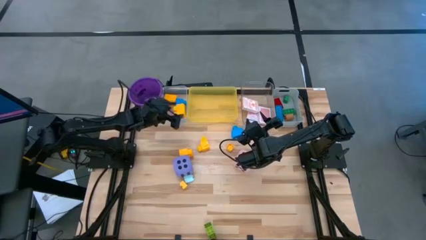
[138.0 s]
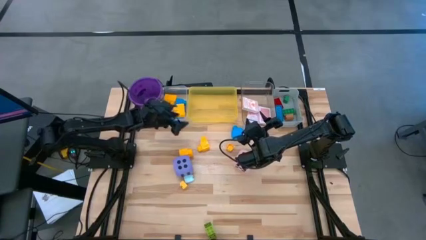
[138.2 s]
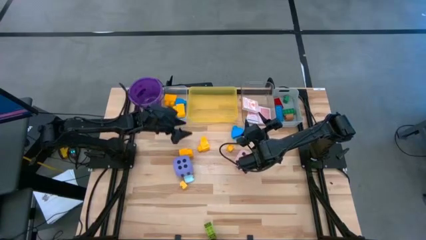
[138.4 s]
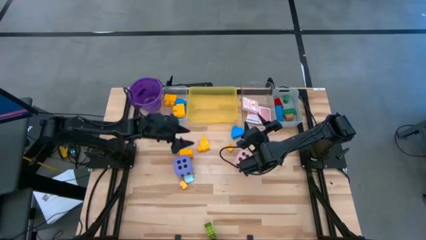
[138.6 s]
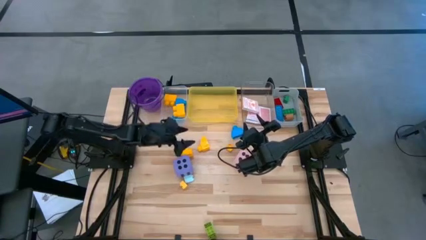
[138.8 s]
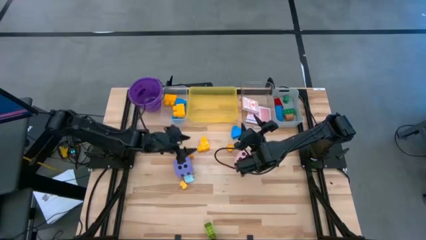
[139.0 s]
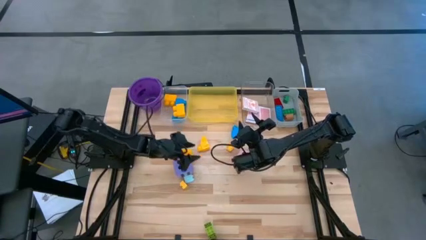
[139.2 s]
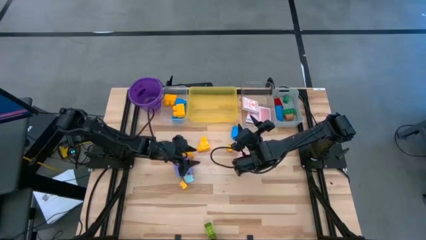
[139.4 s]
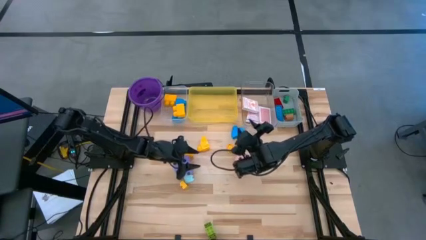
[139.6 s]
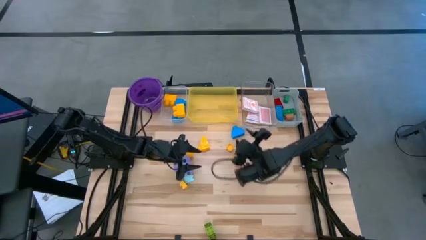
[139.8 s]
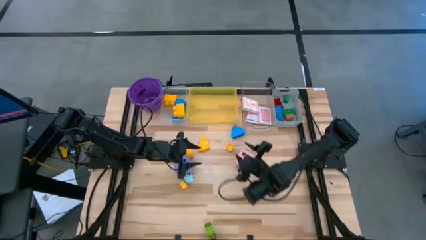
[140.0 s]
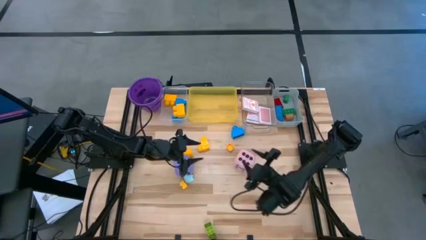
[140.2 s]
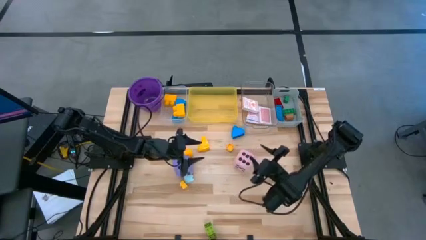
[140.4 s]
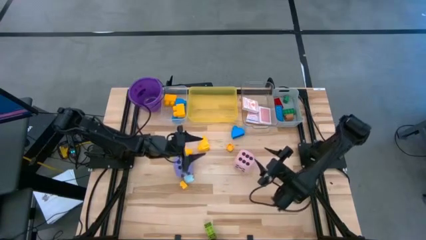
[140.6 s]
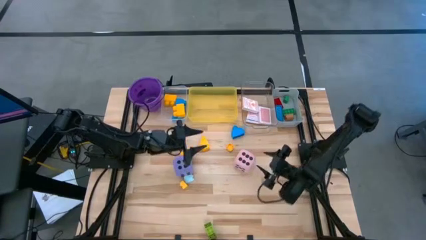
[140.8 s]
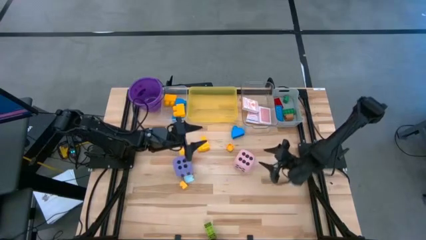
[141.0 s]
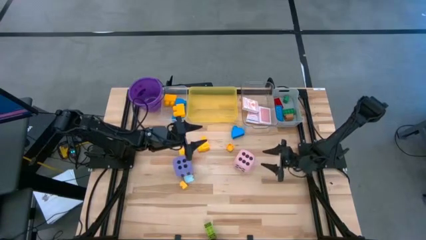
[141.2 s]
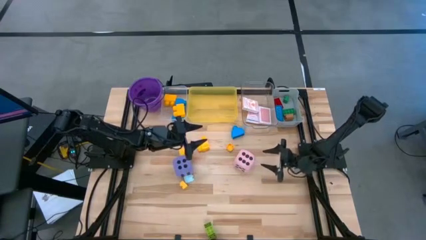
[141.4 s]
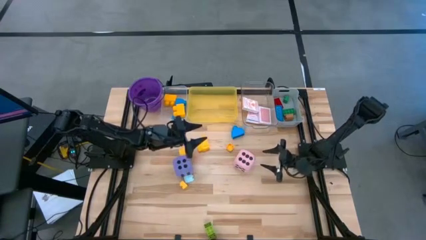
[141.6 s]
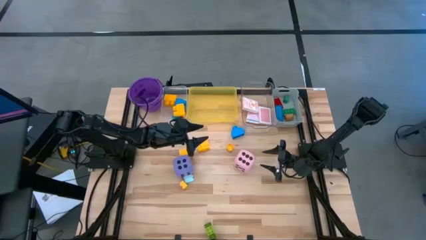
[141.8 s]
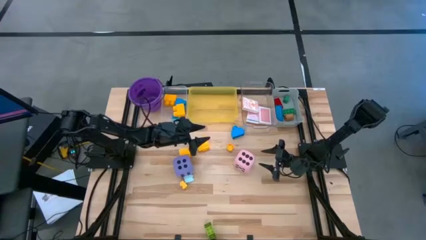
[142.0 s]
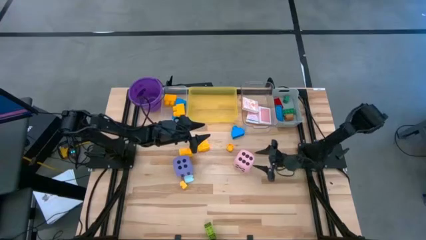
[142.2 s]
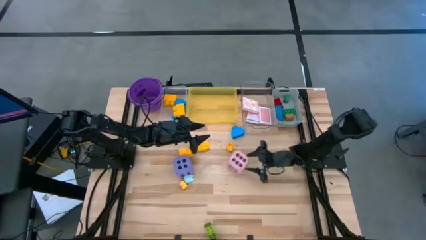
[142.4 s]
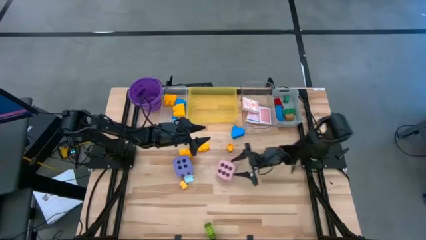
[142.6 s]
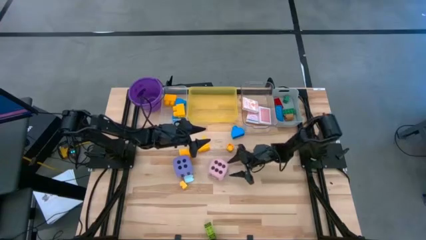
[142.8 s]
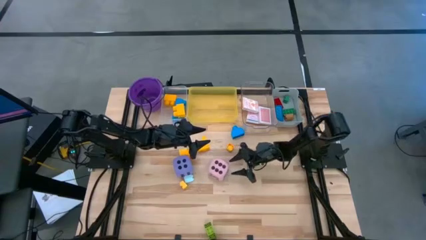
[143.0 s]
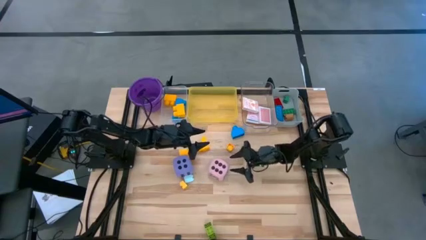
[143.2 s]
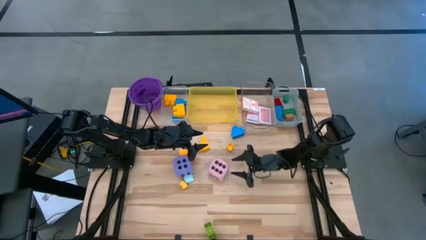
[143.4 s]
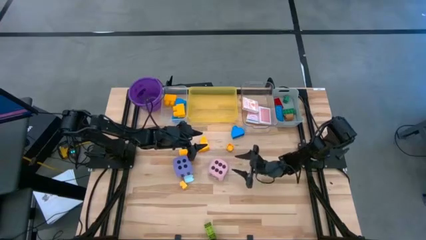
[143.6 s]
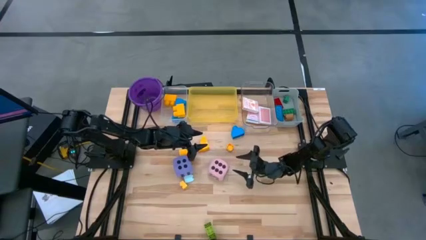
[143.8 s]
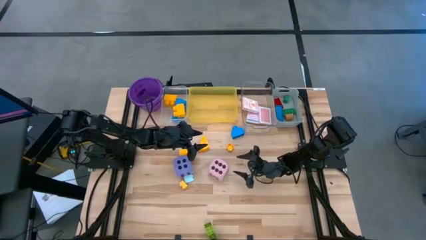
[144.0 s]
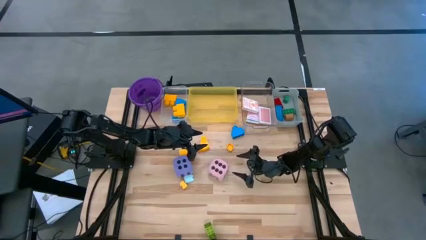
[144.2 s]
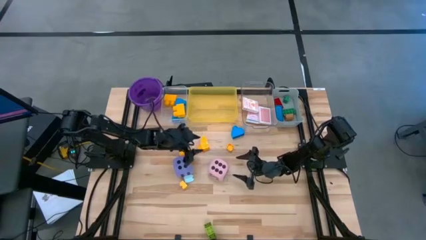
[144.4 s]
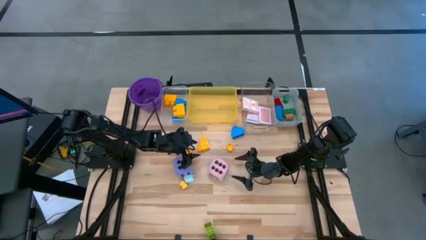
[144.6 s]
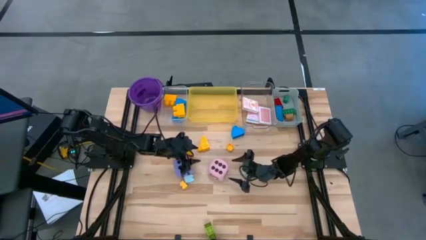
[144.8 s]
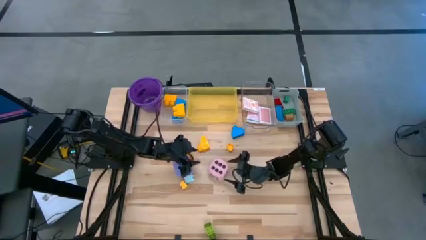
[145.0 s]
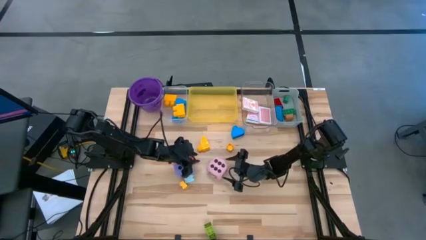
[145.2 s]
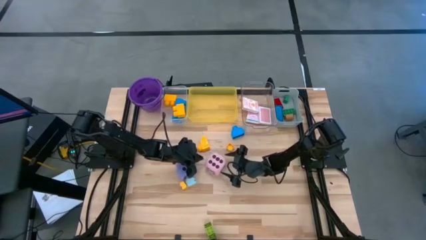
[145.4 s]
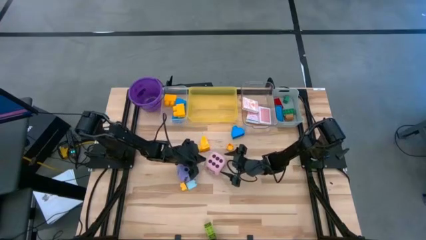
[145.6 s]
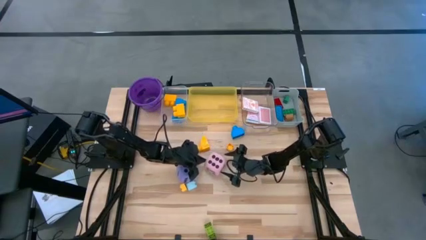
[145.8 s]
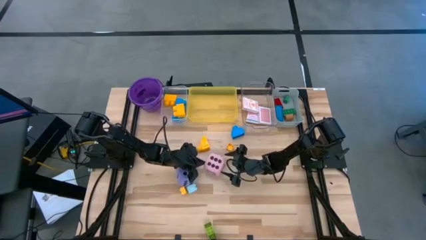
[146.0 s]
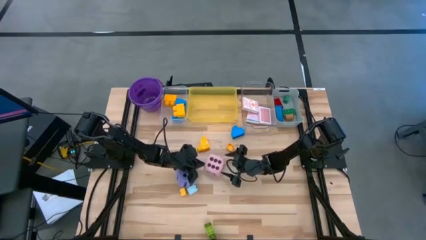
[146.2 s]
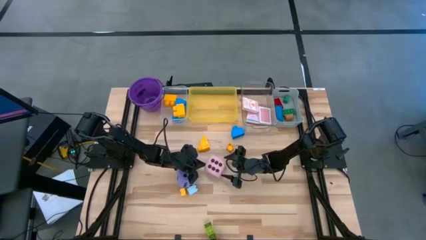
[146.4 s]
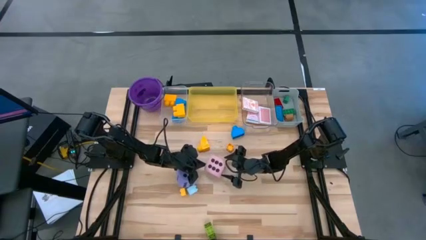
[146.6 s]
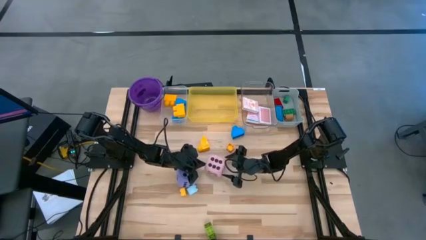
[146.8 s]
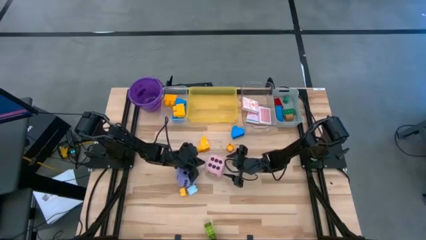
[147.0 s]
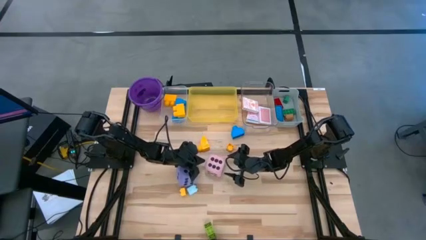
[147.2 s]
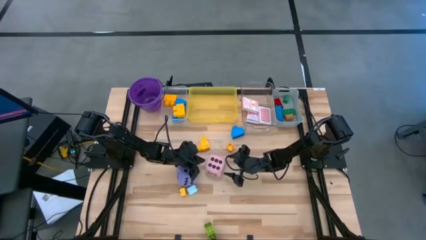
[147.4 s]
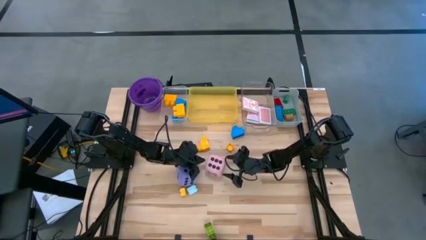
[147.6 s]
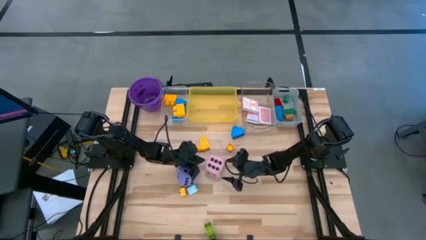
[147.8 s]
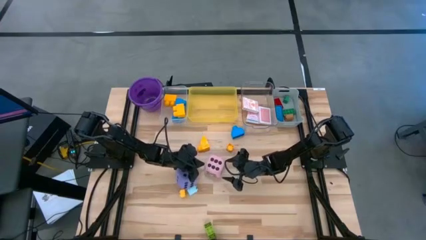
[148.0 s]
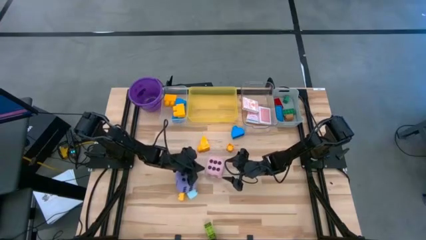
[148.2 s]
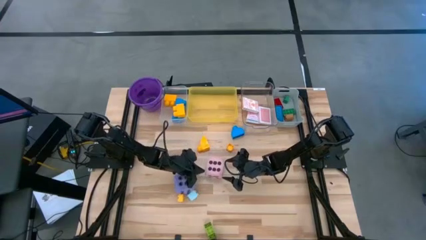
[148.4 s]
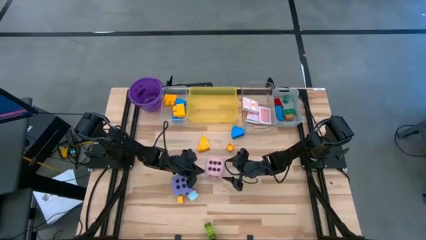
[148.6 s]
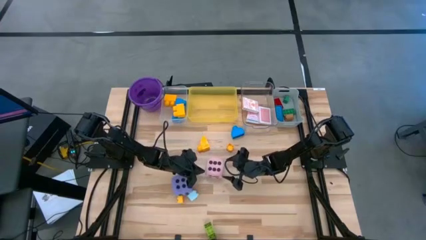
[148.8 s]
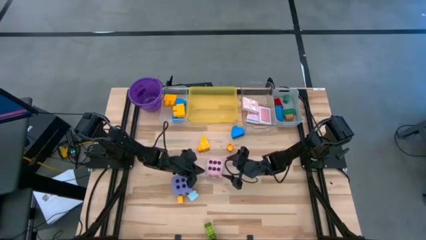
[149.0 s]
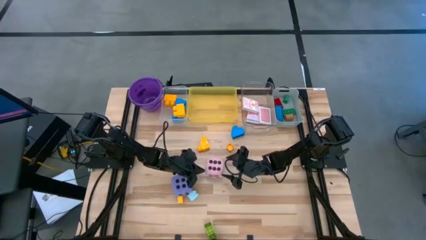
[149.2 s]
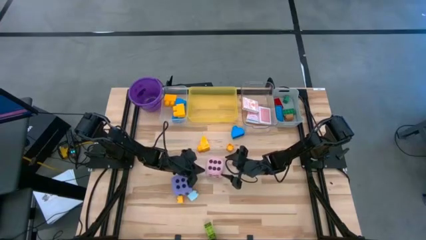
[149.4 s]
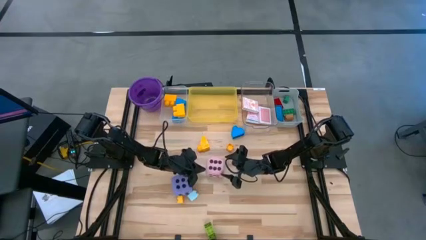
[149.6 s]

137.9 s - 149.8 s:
Task: Pick & Place Toys
Put the pink dice into the yellow transparent bin

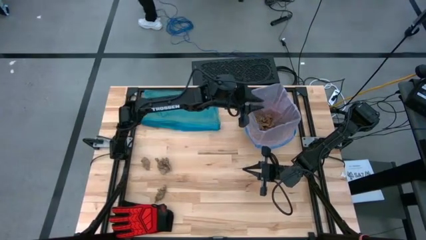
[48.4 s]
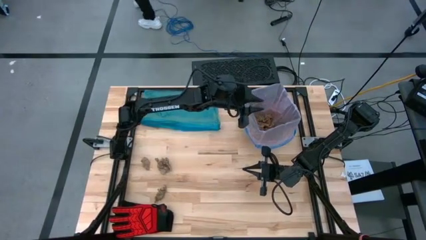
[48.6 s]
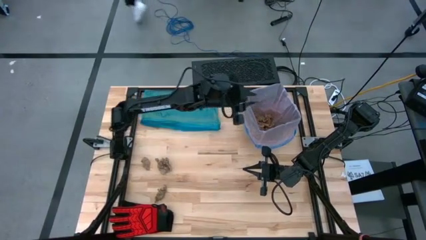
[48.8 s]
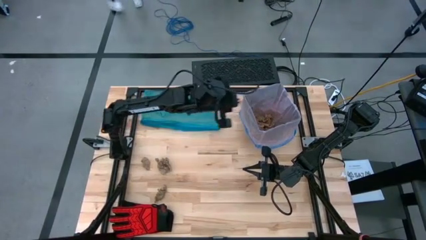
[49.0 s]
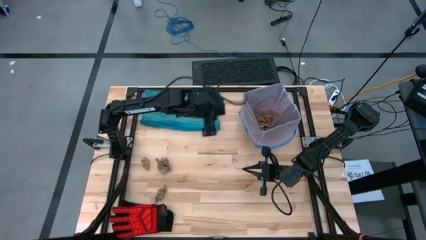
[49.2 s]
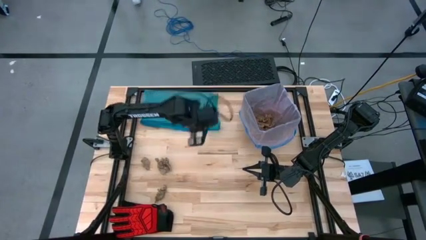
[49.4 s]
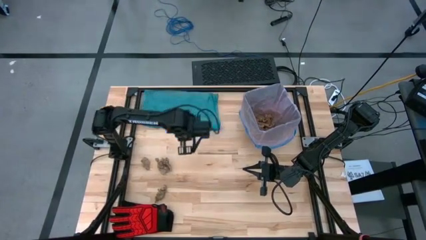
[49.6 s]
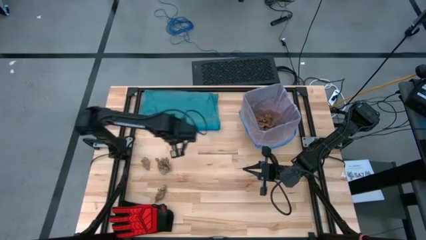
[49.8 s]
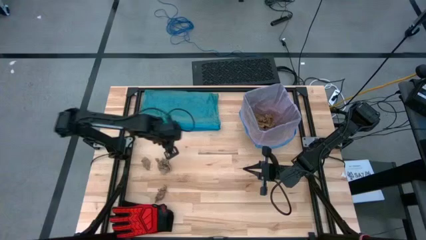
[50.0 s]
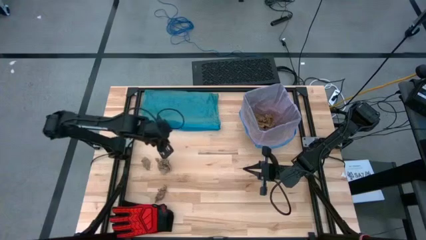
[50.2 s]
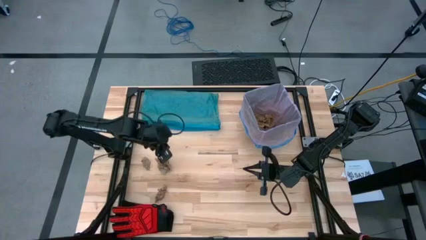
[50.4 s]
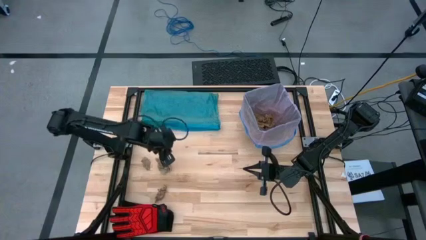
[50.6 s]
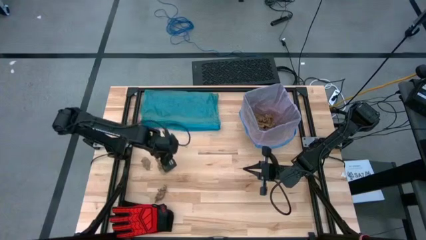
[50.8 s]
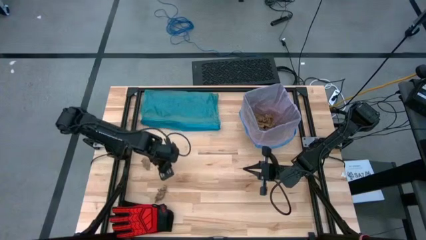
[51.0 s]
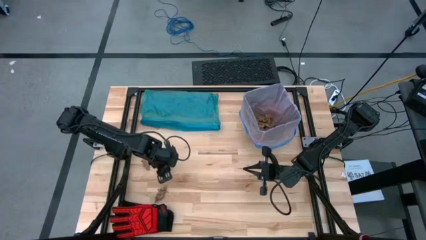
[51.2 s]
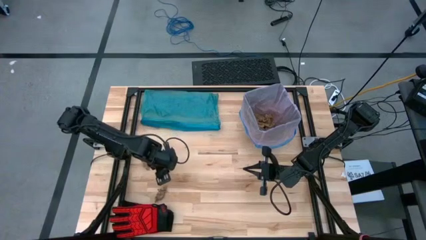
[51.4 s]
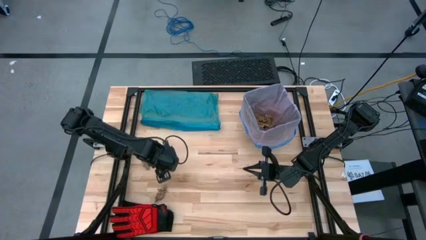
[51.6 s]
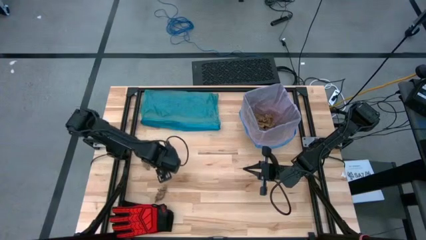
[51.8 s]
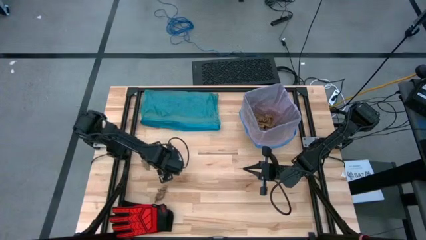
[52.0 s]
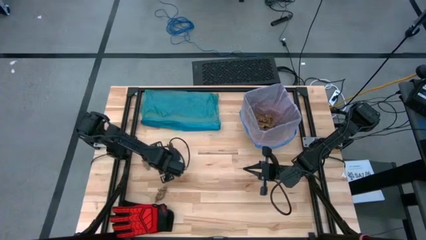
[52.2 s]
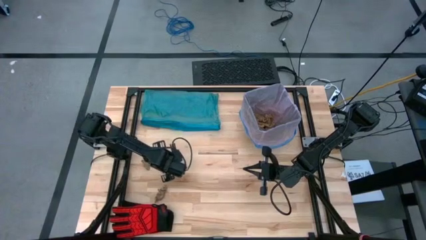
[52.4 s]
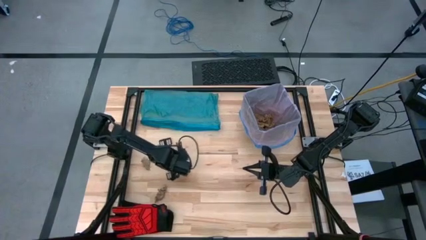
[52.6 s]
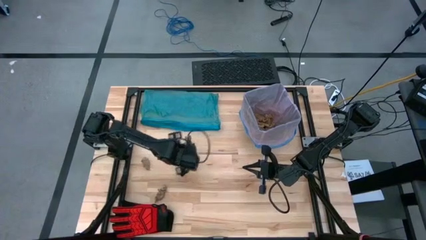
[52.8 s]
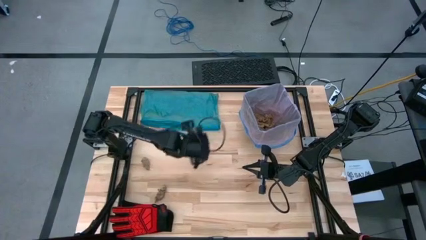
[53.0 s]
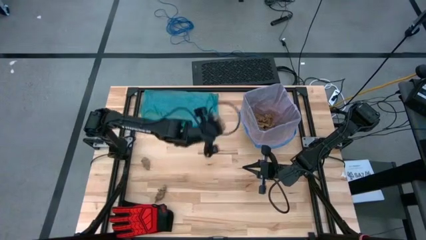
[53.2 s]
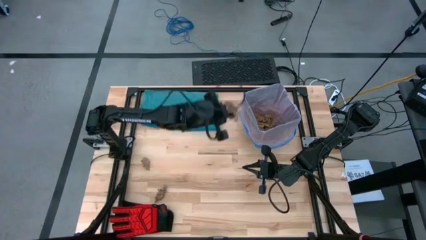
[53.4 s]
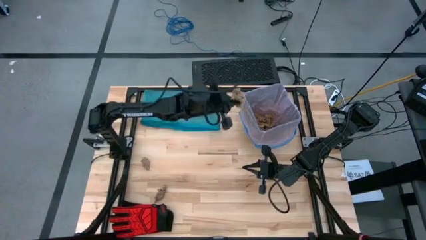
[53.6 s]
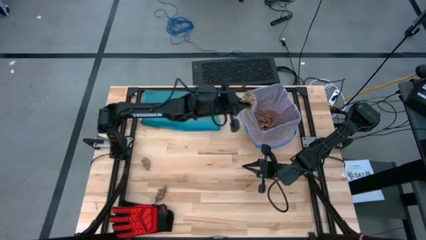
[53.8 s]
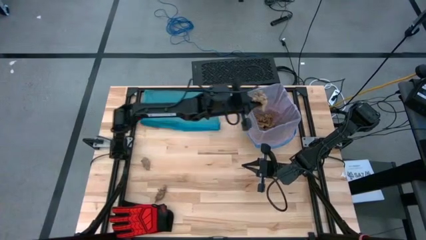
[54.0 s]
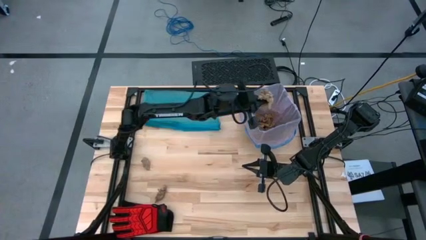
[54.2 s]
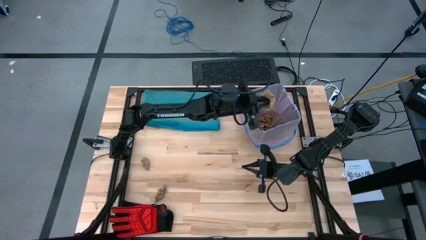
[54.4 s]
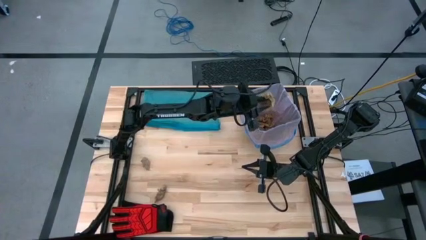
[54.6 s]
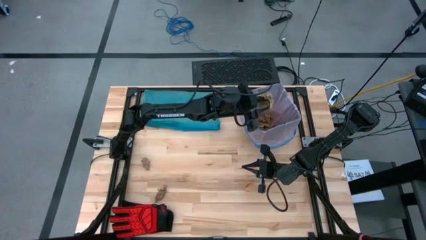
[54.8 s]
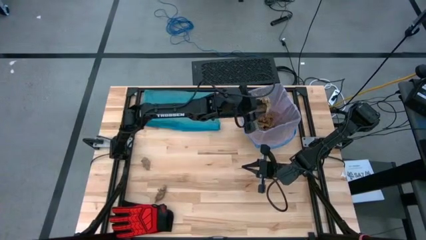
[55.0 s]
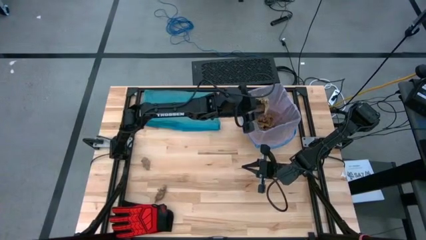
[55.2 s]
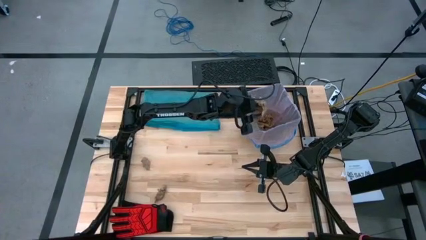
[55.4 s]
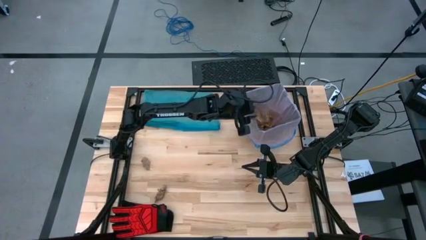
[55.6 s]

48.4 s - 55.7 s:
Task: place trash/remove bag and relplace
Put the brown napkin into the trash bin
